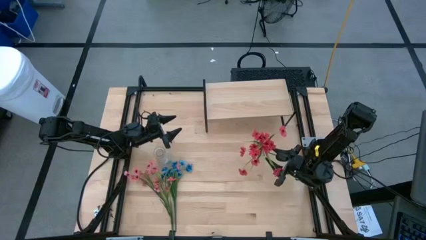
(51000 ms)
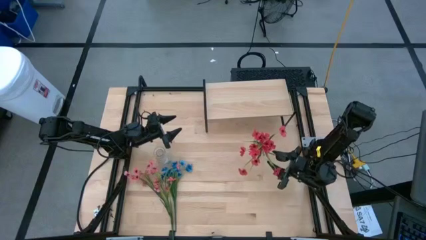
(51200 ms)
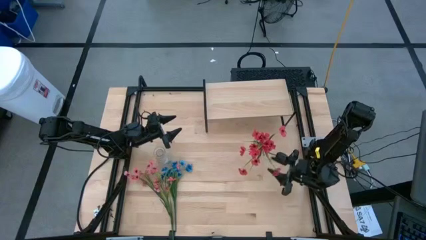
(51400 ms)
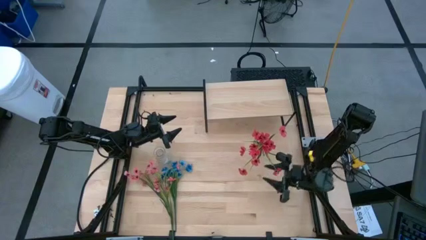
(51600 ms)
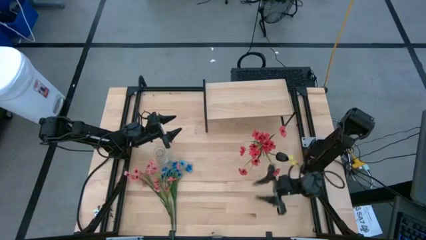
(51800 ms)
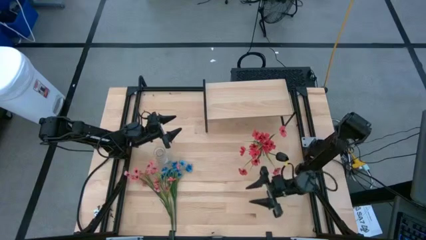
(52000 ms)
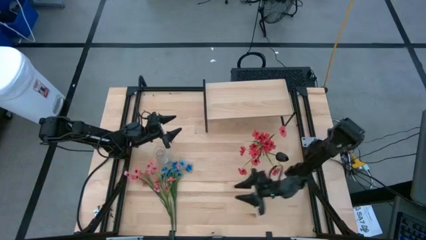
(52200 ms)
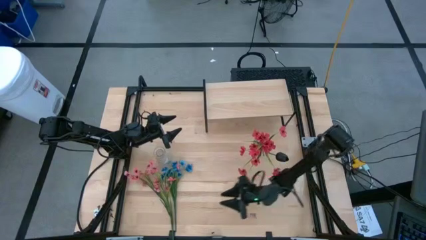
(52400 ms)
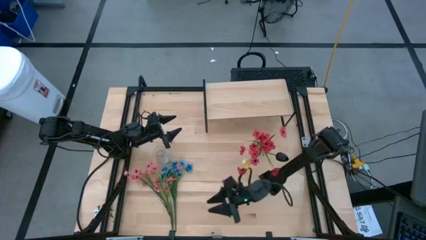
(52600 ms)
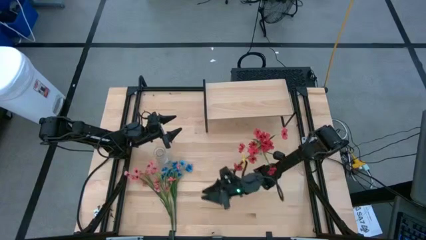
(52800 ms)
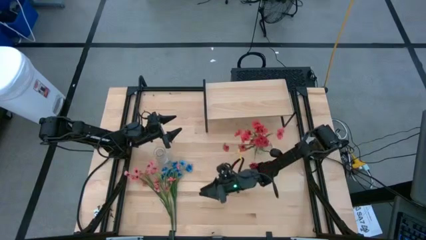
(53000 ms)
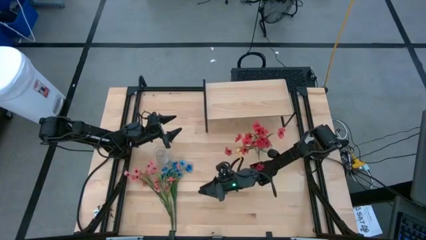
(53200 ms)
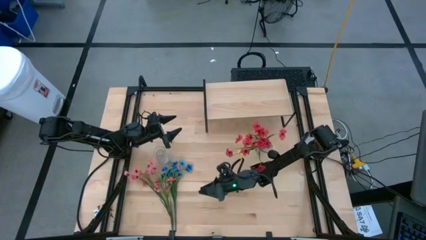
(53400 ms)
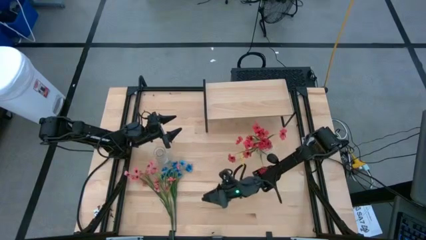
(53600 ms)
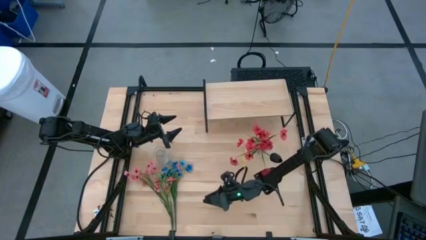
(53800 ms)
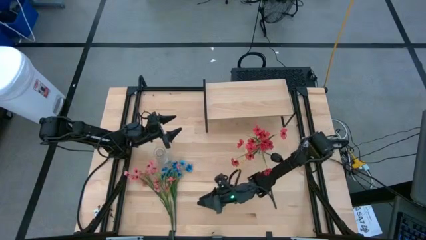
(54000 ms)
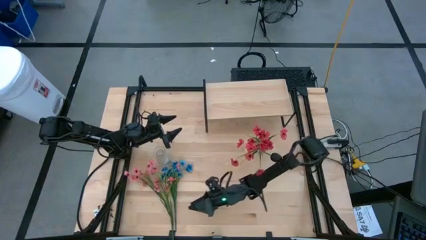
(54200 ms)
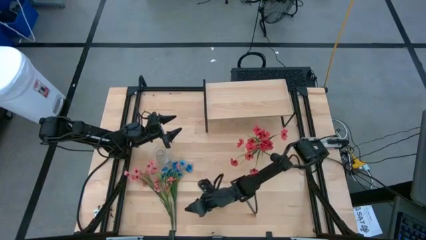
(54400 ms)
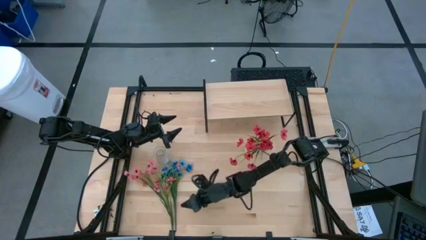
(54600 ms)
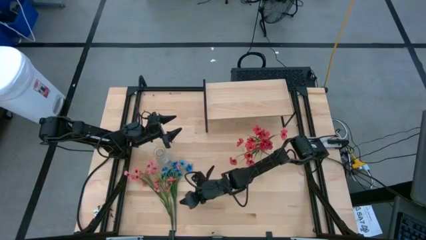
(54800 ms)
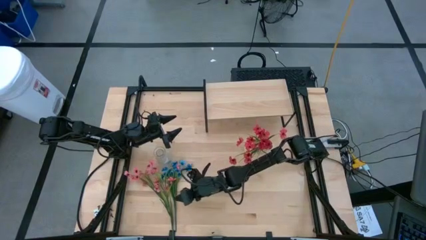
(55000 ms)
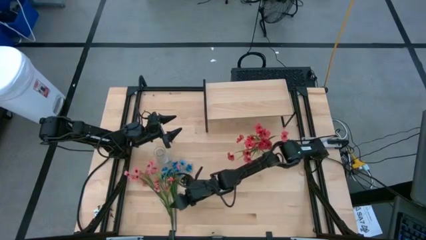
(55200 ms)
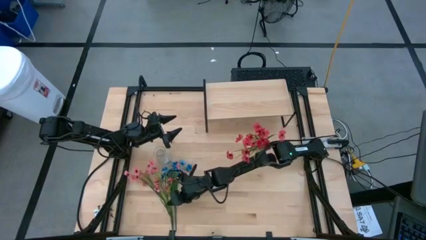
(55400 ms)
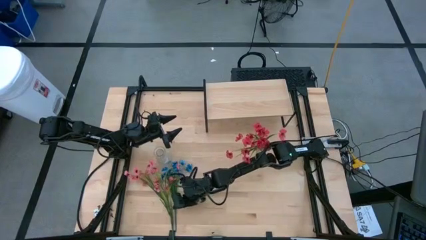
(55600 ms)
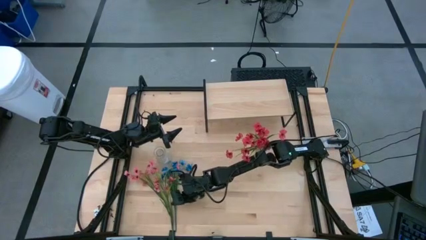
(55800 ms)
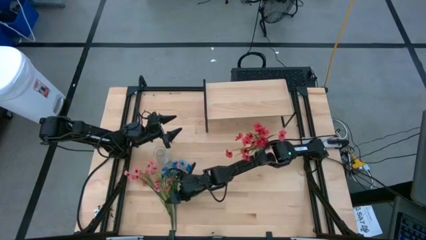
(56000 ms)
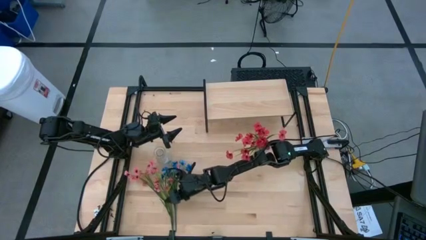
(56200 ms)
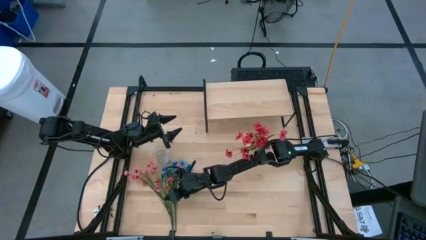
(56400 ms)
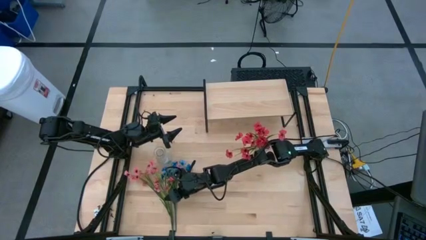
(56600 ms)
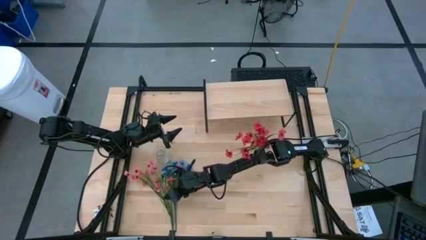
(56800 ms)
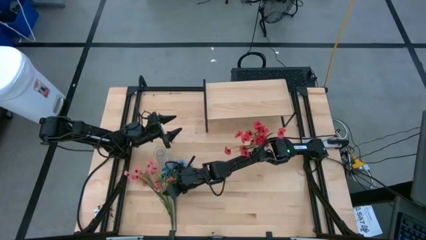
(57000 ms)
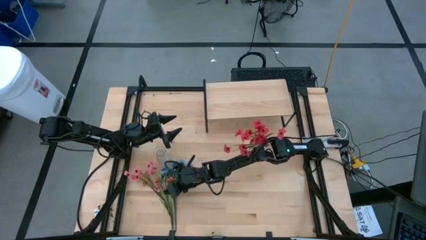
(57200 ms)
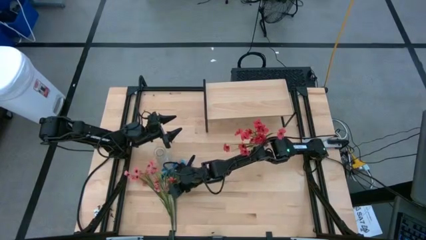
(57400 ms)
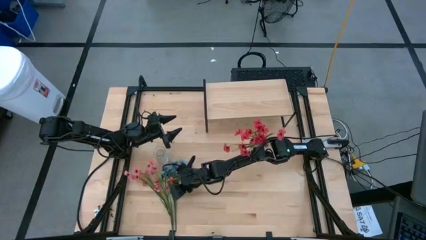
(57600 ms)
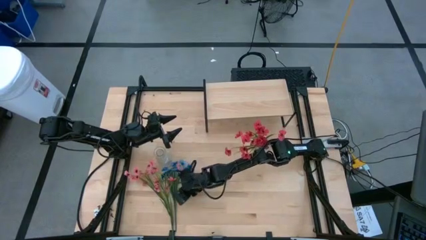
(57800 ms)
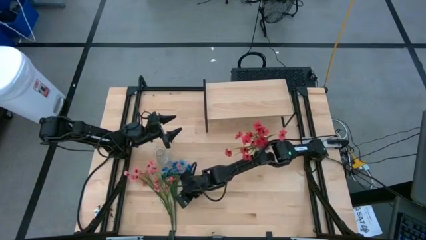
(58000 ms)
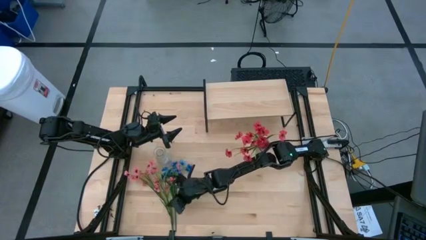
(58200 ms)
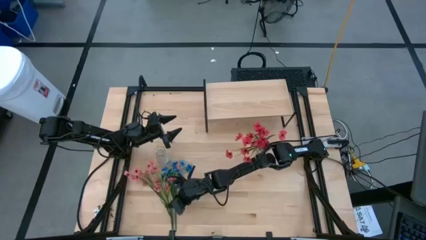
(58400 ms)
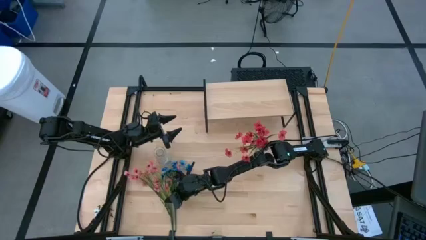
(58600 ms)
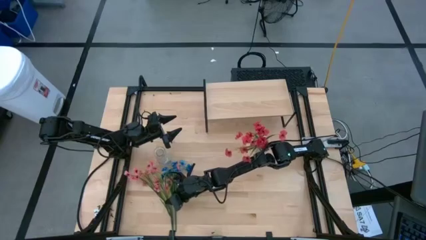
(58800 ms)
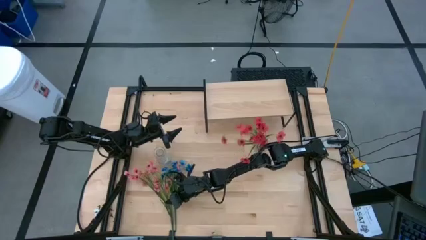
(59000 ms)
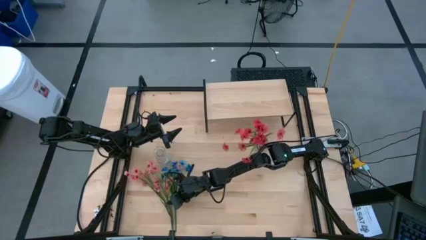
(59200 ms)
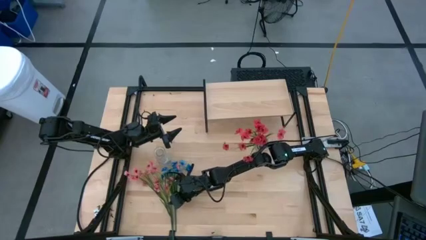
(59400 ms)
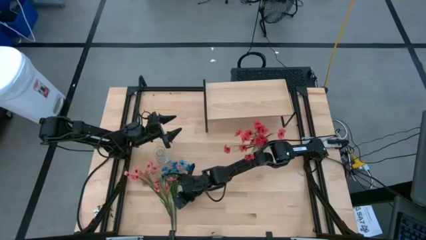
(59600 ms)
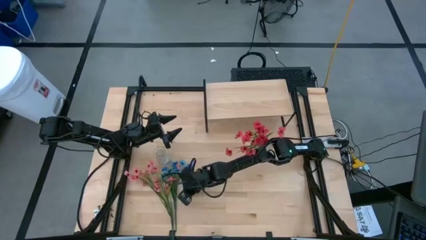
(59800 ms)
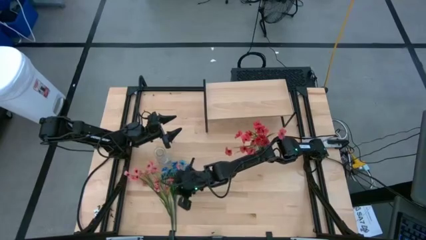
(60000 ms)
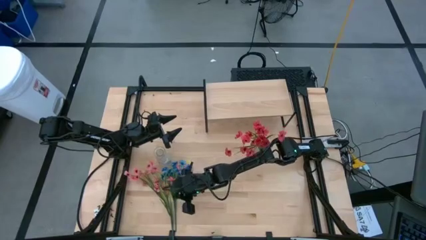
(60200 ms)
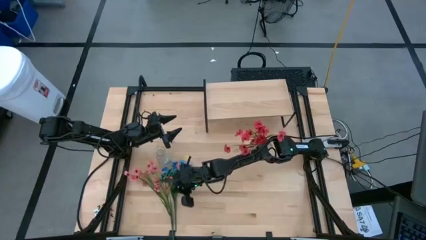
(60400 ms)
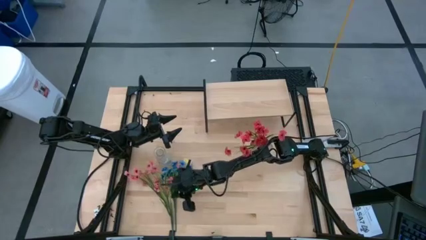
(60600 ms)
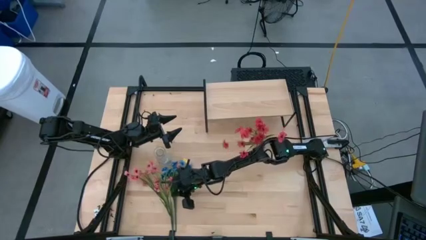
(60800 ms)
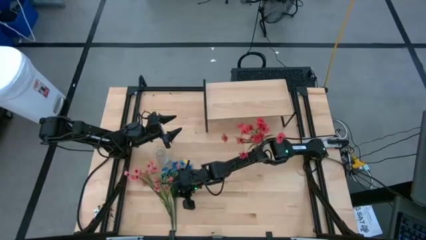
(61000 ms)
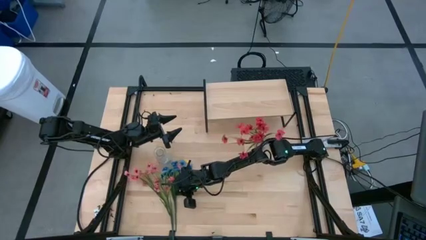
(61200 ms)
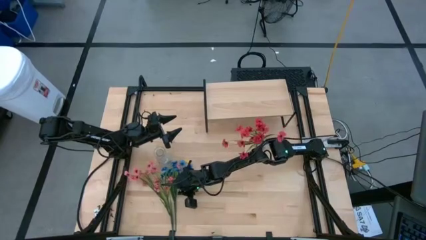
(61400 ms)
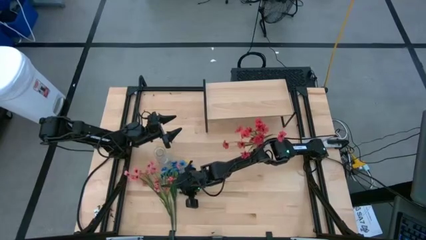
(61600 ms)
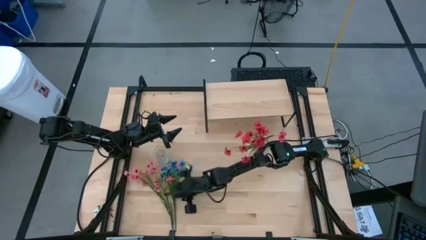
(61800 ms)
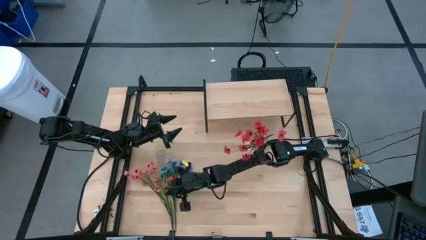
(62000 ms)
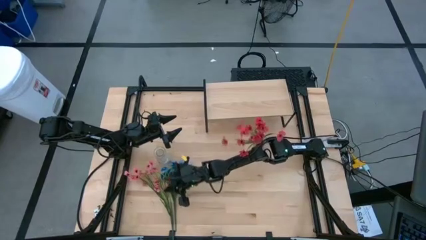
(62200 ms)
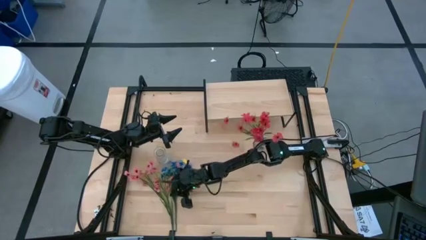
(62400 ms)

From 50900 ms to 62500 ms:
Task: Pick and place flowers into a vace then onto a shelf
Put the blue flowers into the right transparent vase

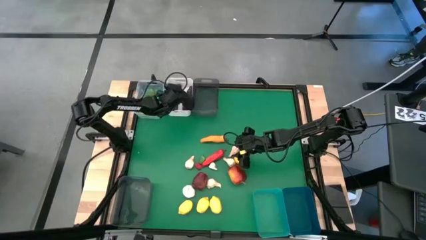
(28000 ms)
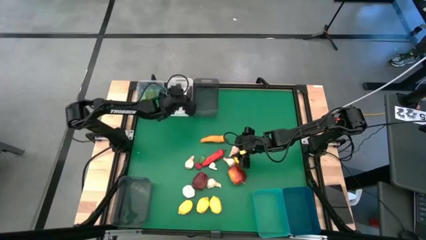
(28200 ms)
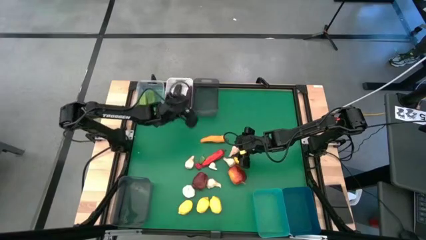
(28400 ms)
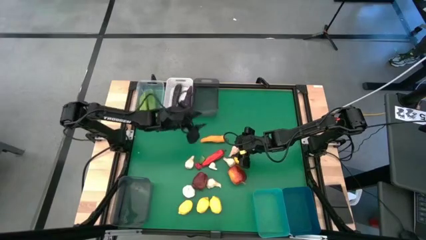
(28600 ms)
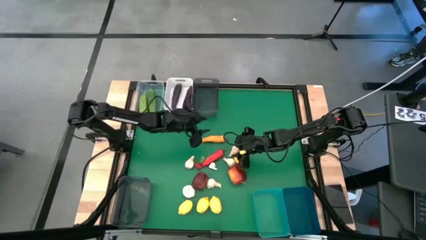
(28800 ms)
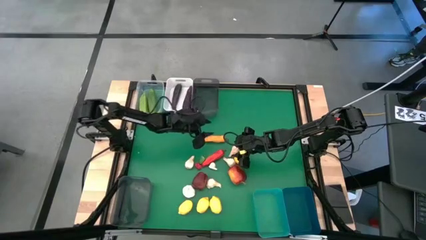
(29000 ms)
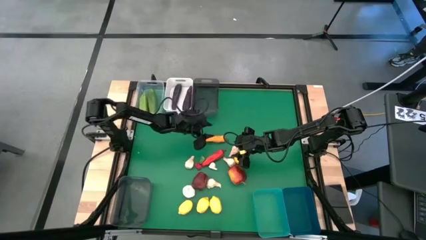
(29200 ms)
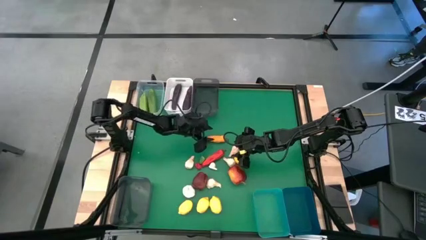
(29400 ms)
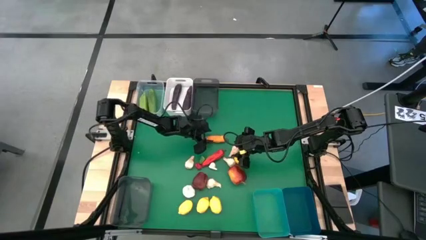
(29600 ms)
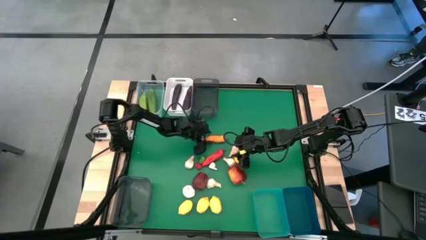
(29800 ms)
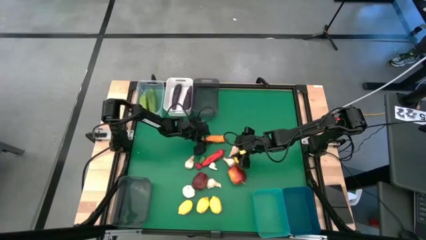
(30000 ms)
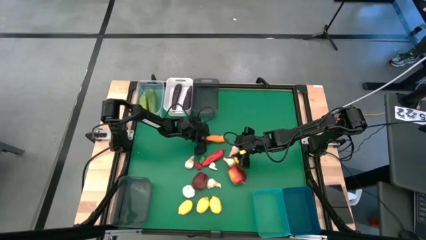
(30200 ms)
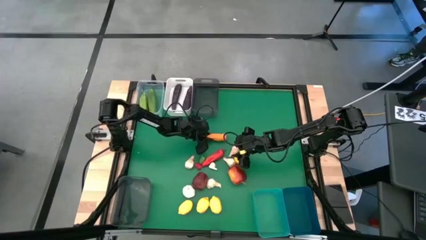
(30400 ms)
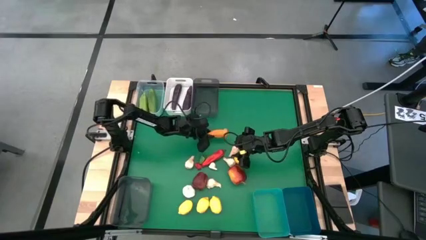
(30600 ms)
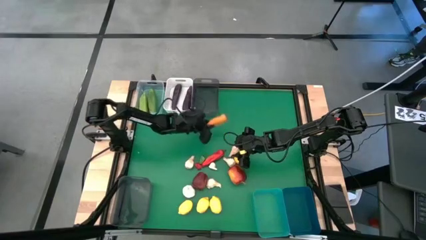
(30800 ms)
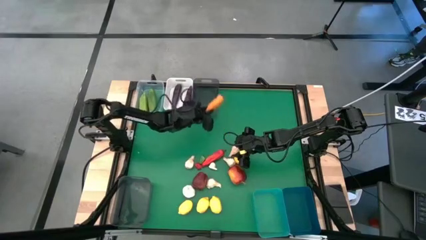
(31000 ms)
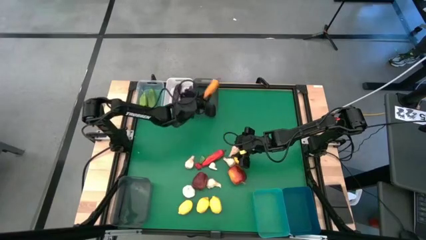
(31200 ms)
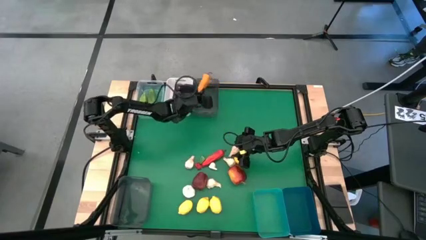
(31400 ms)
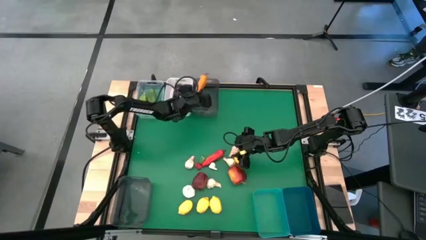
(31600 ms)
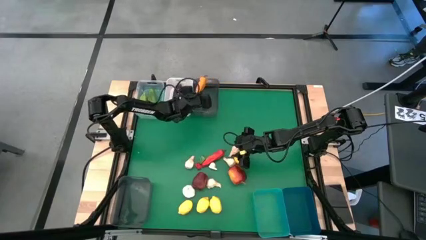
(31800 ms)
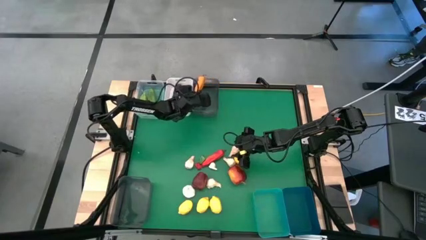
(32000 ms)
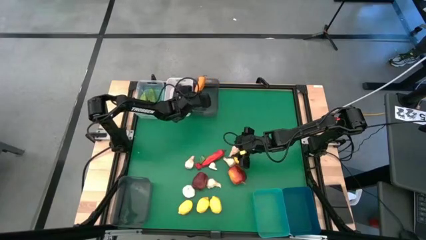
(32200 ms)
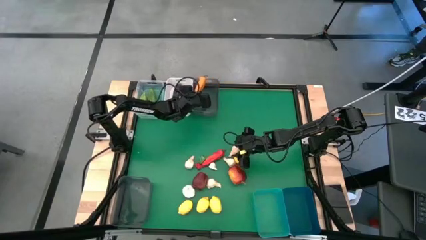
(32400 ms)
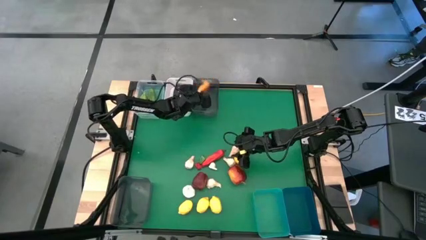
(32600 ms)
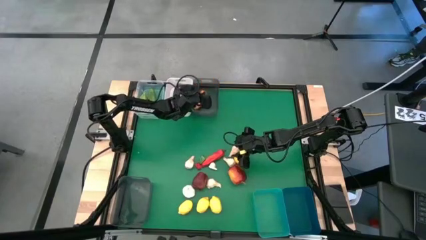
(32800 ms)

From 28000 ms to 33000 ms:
Task: Sort produce into baskets
Put the orange chili pepper into the top black bin
